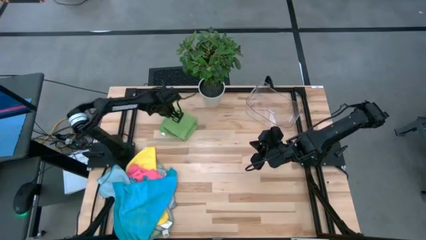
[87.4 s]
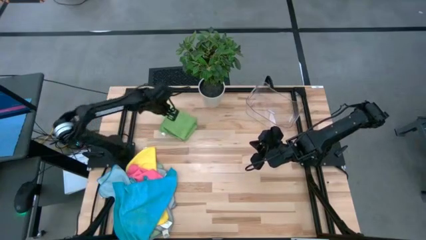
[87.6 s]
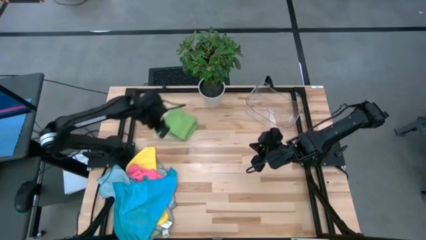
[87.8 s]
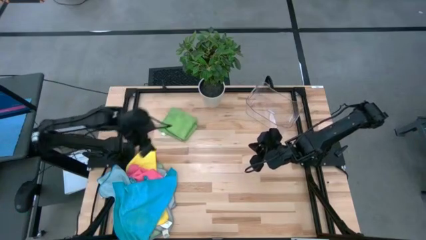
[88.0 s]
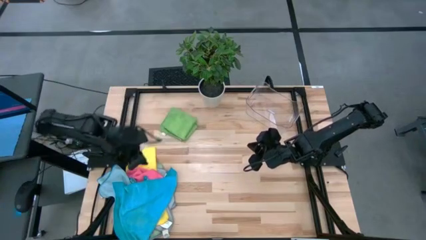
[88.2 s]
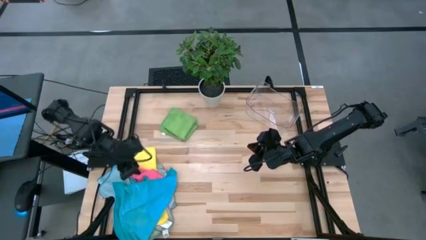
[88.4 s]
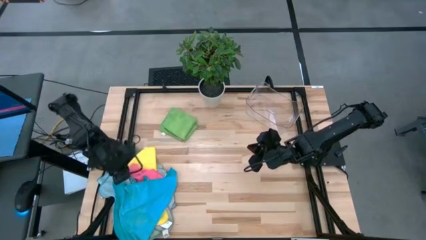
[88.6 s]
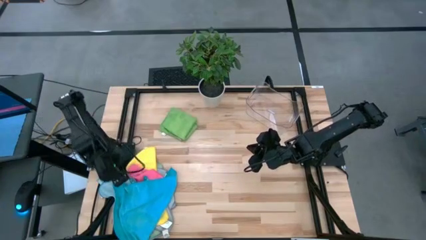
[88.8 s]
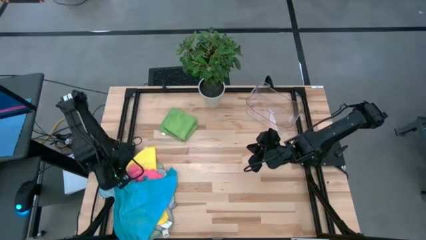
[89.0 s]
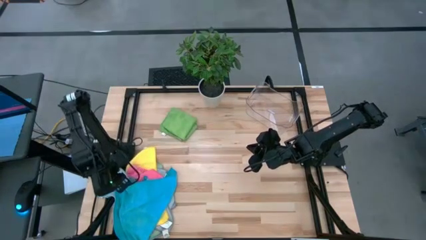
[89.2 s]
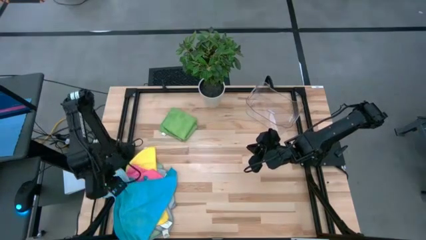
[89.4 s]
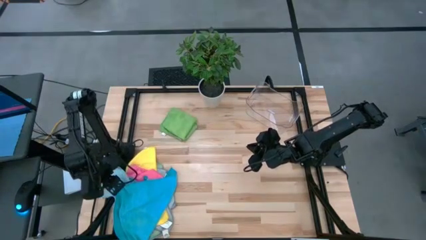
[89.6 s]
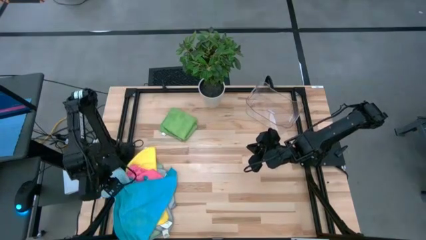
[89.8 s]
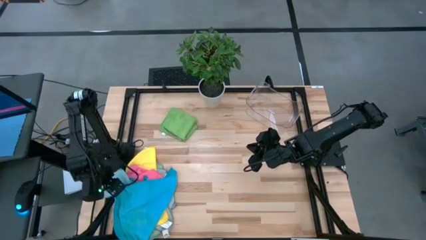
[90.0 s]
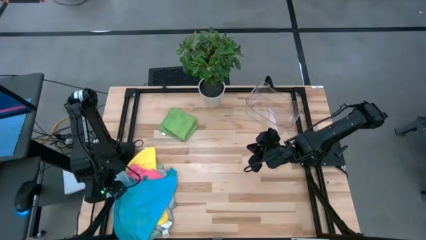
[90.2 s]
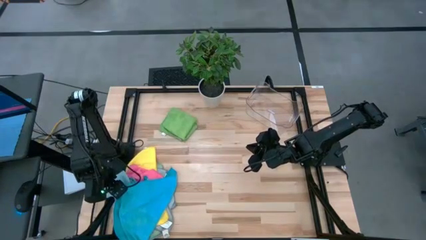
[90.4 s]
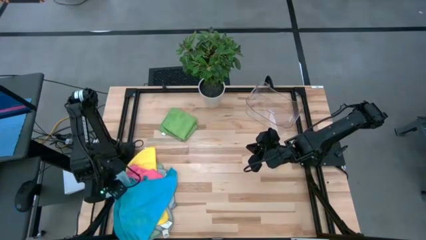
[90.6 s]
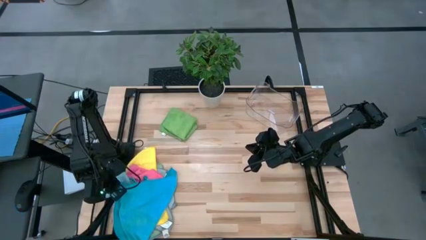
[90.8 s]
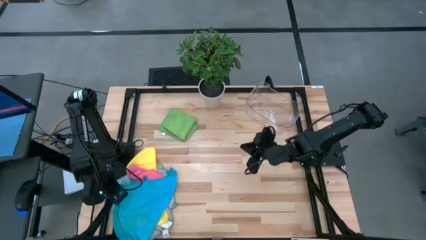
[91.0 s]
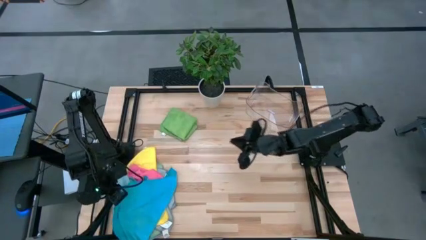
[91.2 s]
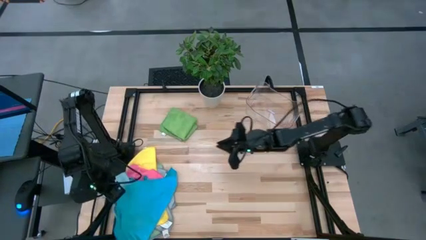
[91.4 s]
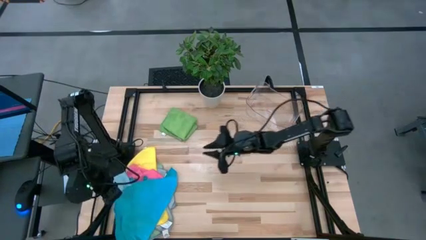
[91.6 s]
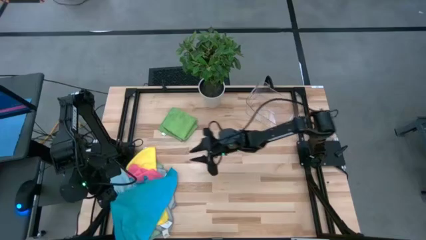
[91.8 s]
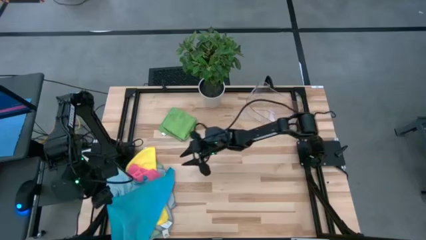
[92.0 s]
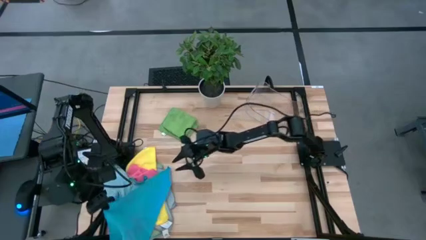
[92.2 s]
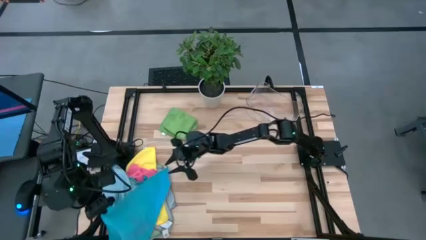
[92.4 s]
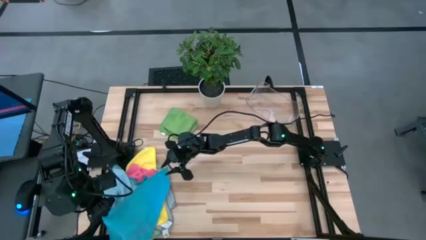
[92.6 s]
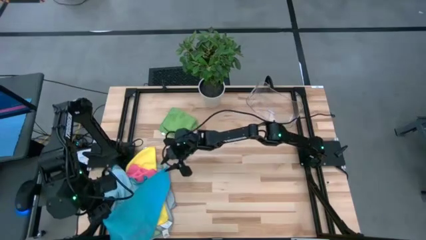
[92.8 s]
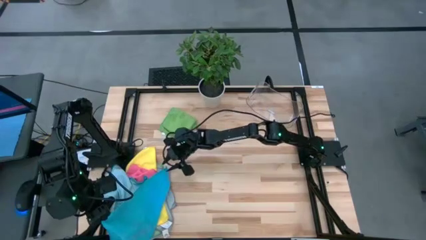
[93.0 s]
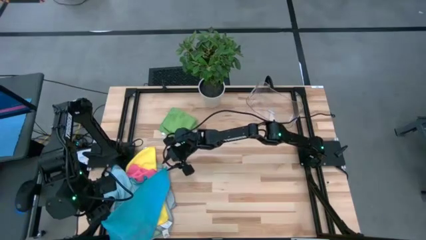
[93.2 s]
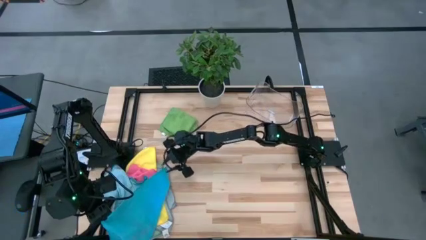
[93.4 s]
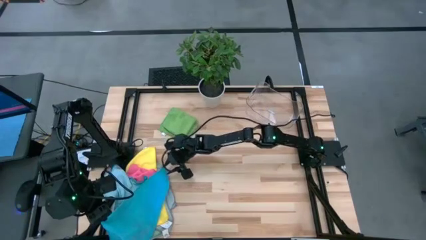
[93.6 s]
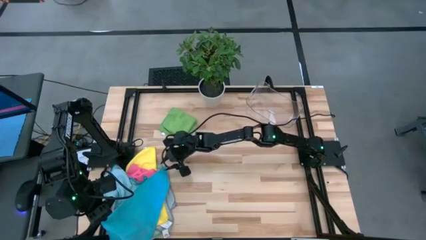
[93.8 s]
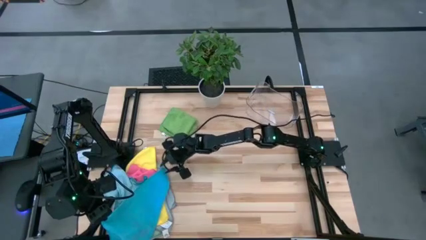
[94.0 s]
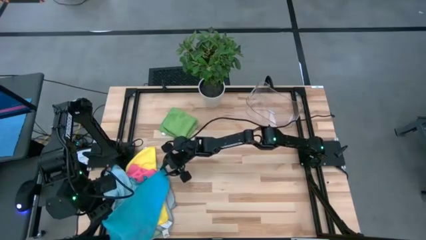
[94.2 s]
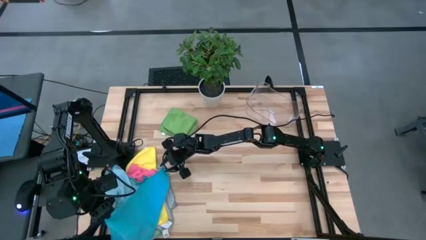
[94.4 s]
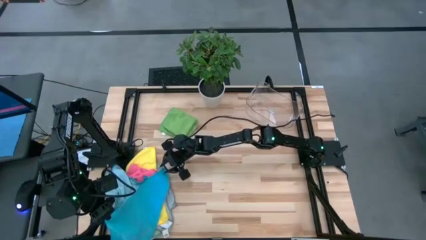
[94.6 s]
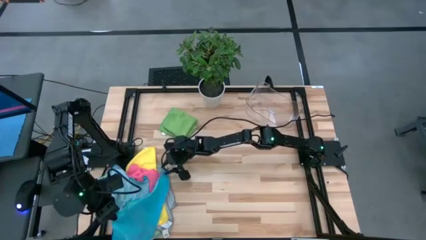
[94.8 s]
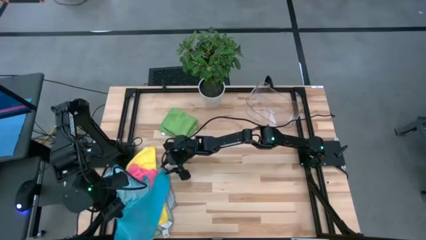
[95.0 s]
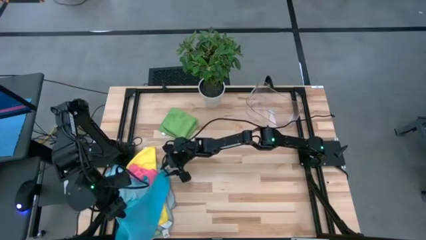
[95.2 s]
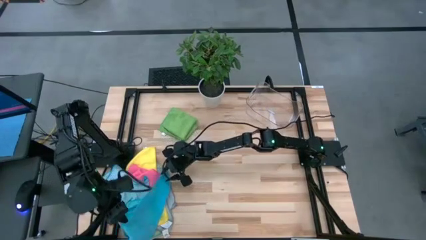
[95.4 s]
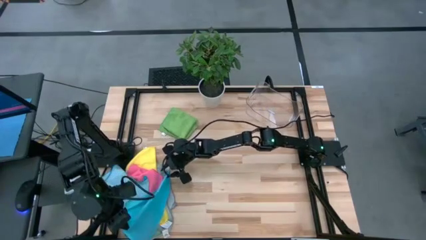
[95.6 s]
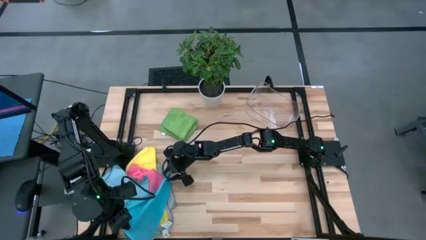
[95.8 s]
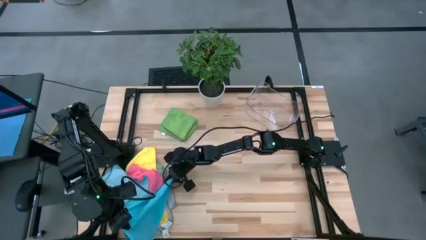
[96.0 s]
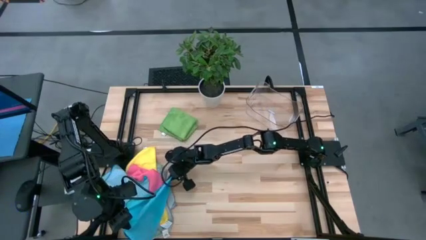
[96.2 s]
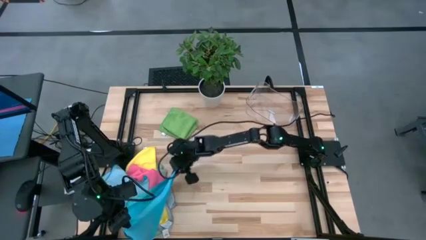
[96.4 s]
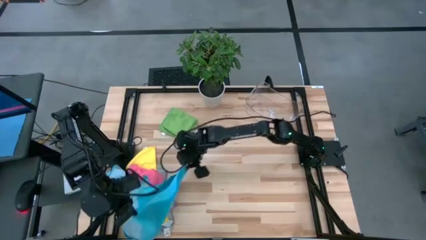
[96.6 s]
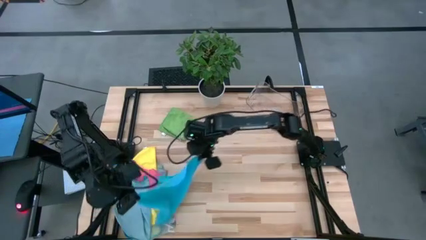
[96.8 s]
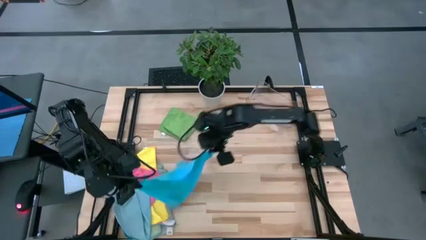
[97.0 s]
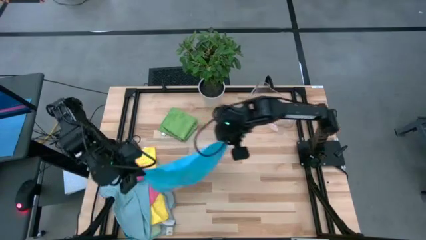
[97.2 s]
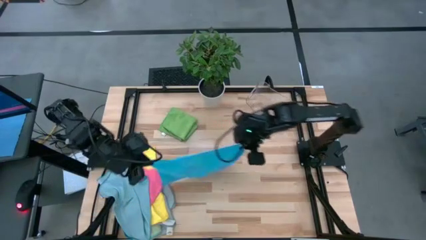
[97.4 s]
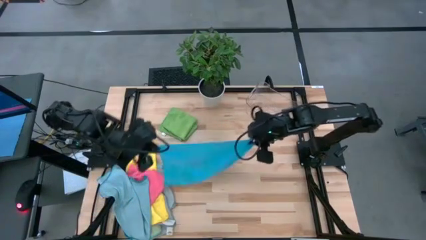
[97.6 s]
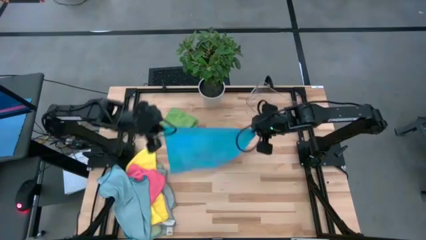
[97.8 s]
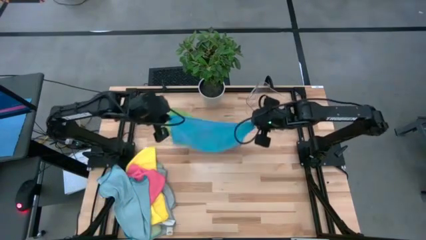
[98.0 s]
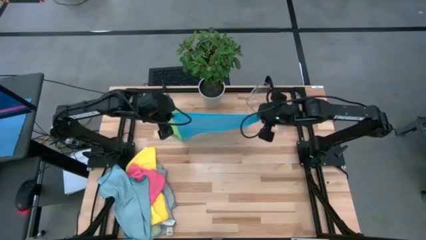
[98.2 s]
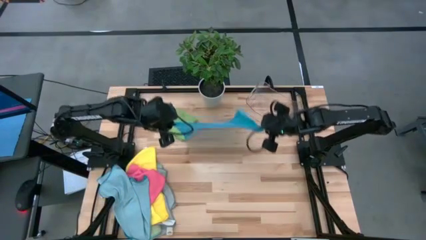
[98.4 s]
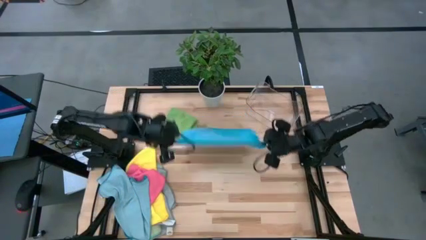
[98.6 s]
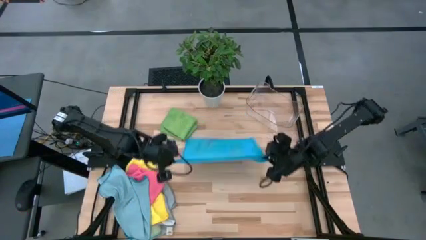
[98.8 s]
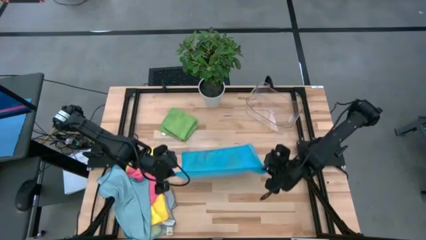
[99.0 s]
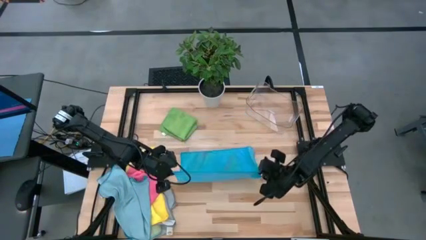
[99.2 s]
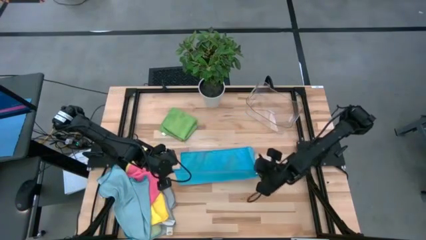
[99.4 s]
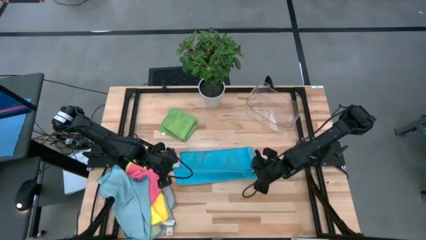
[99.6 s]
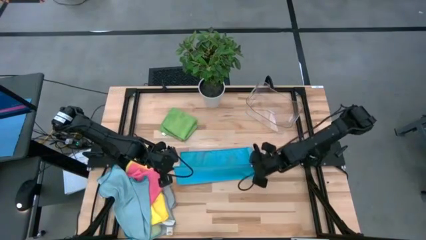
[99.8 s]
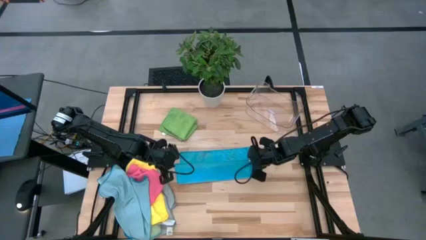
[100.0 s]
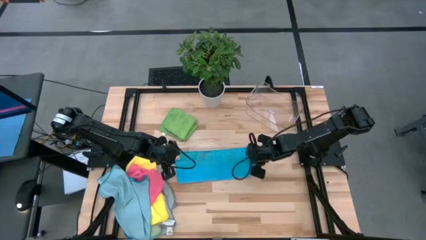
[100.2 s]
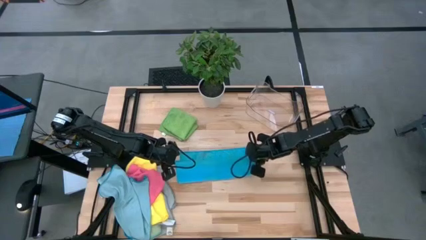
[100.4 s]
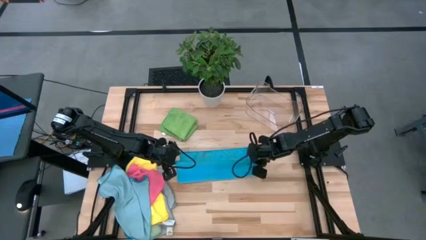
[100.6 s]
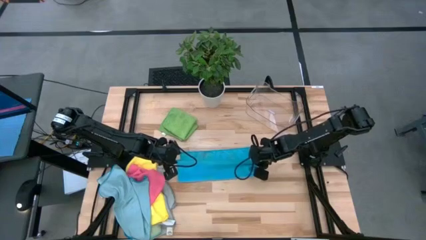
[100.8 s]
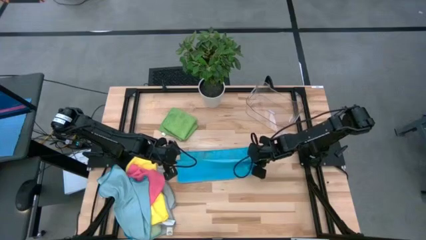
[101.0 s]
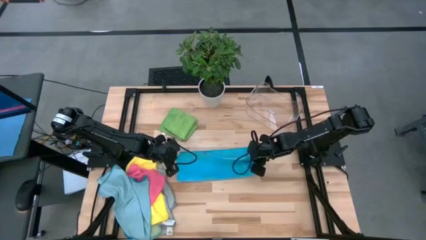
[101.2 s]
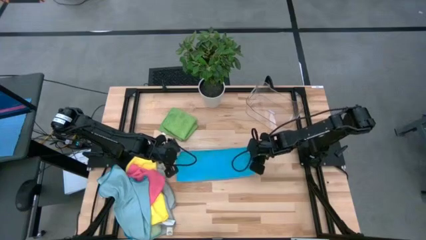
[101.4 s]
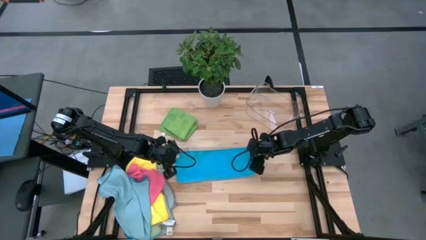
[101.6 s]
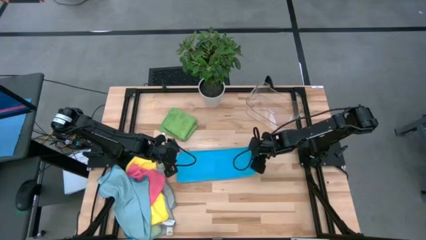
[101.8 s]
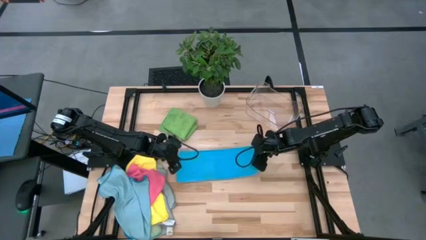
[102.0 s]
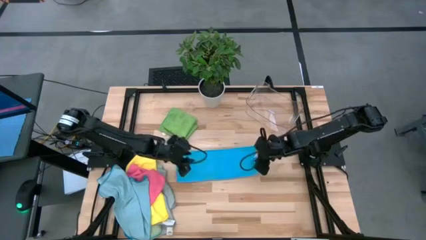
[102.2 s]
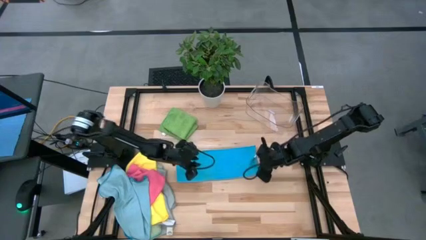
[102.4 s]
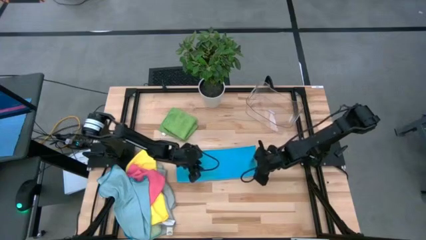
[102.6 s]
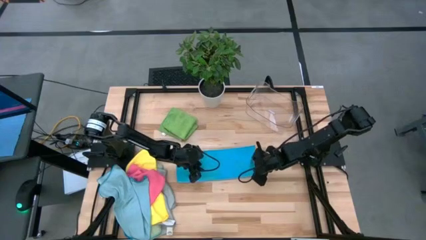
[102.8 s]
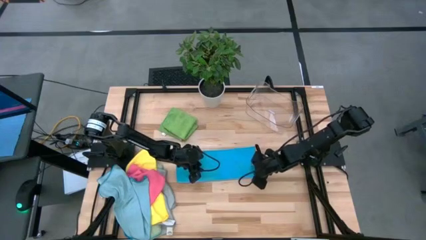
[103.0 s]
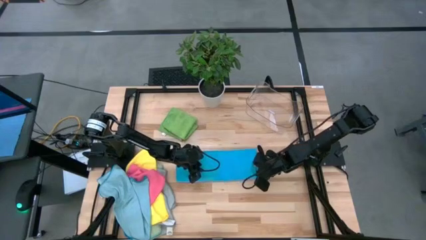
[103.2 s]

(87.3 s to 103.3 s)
Task: Fold microfiber towels
Fold the blue microfiber towel

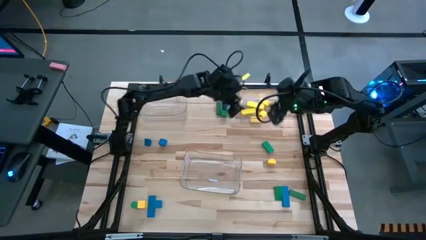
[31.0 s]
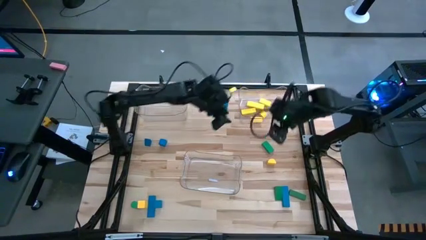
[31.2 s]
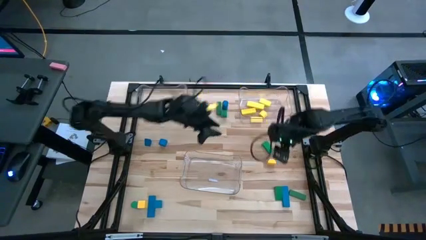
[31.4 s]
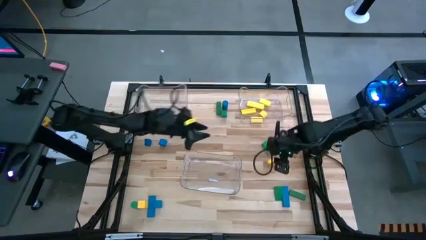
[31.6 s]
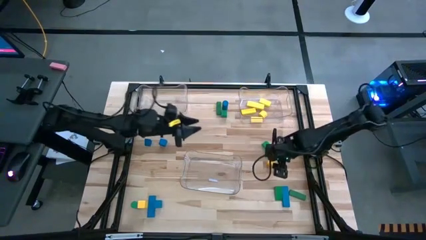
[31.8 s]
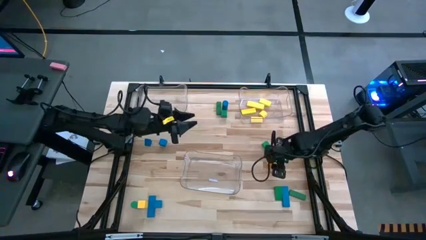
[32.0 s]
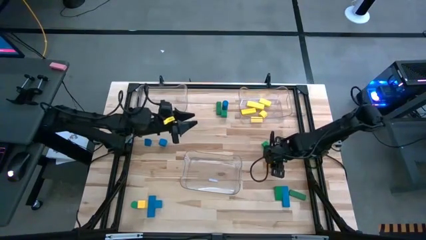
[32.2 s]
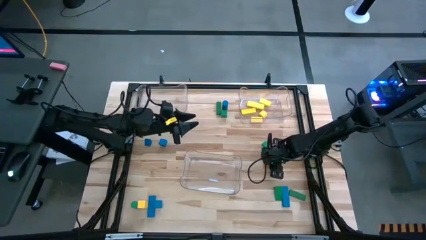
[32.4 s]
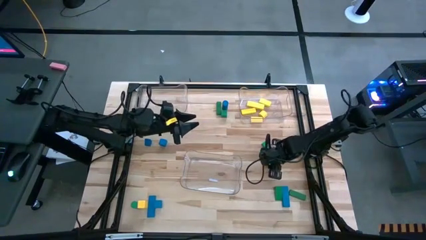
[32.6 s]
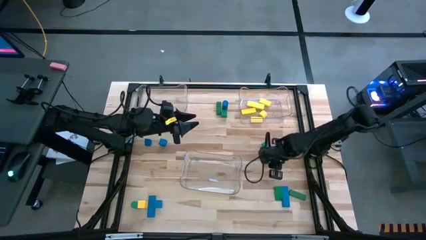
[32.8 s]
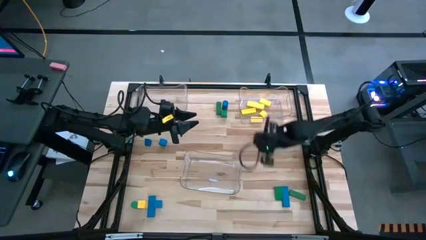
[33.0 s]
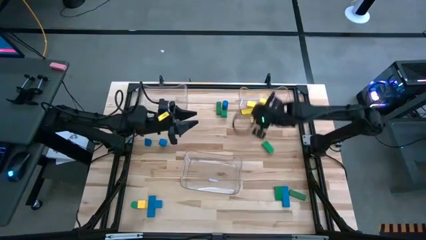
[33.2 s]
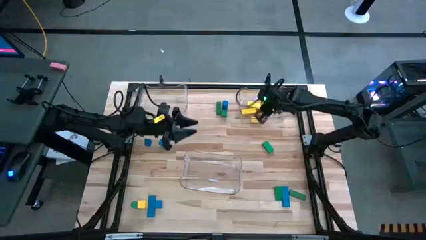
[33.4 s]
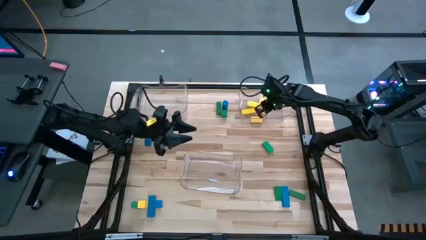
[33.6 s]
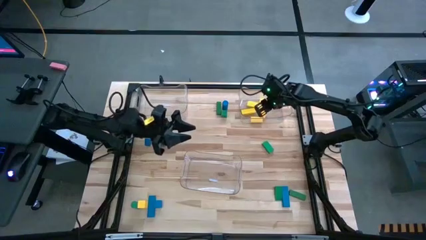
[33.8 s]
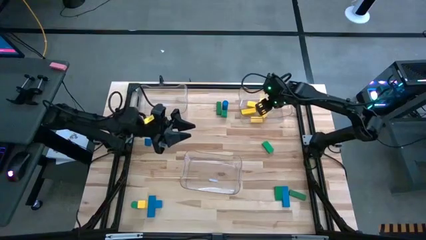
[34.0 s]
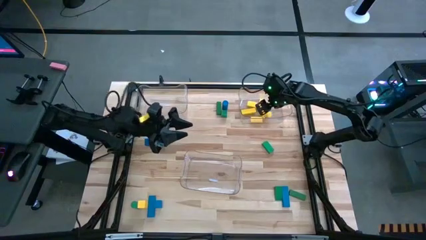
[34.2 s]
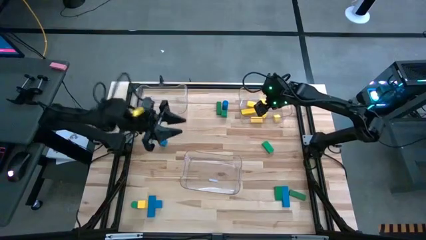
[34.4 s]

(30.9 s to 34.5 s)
Task: Sort blocks
Put the yellow block into the right transparent bin
